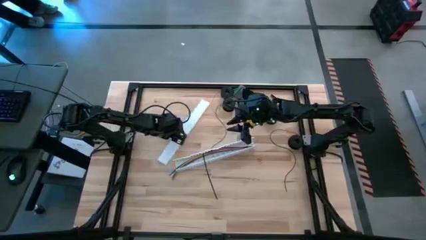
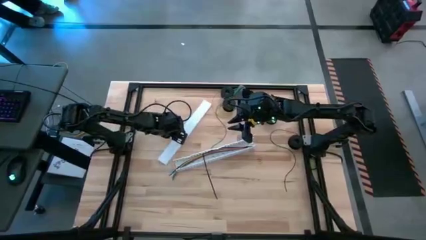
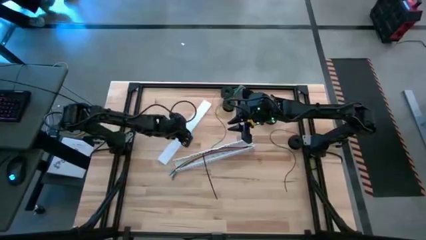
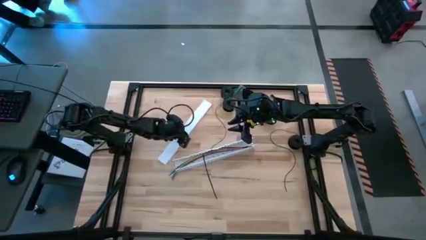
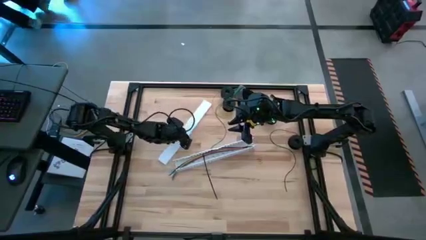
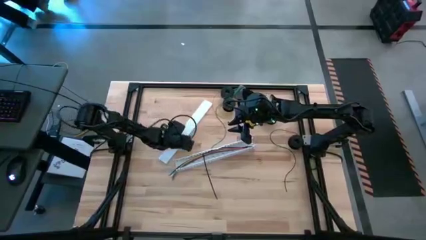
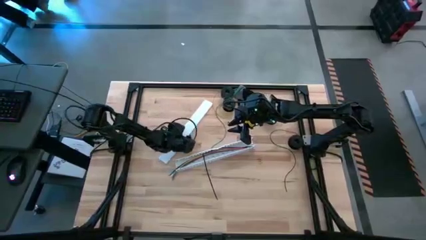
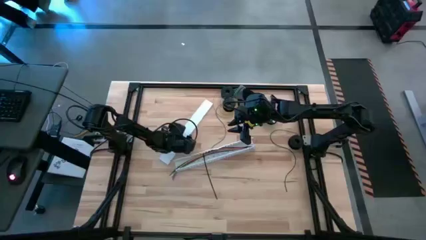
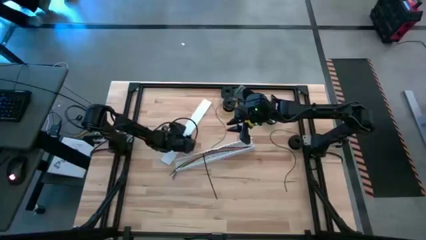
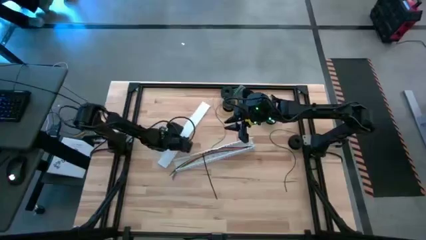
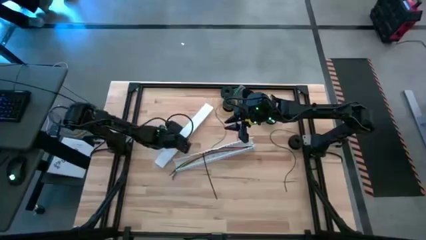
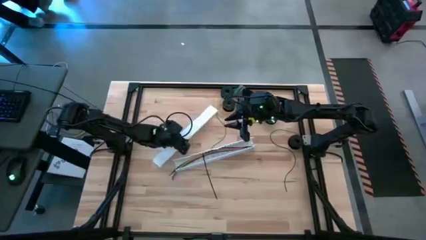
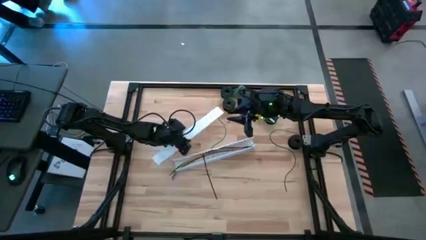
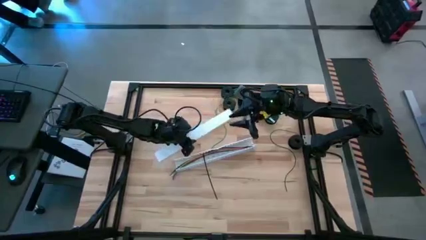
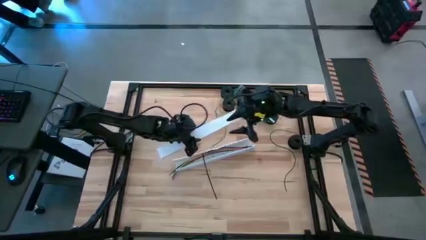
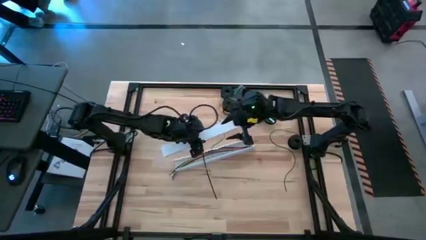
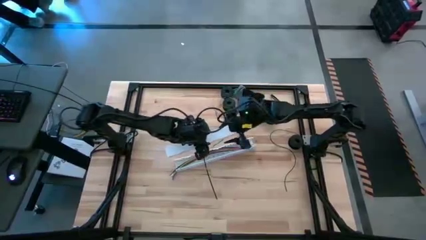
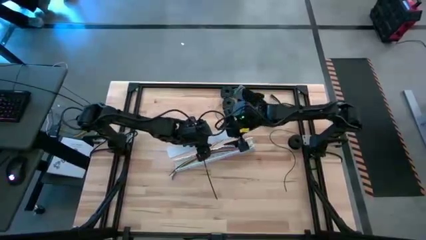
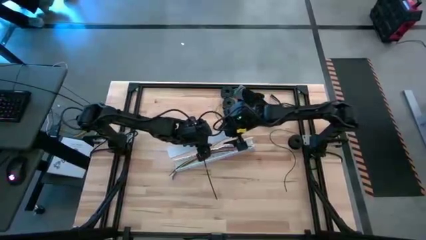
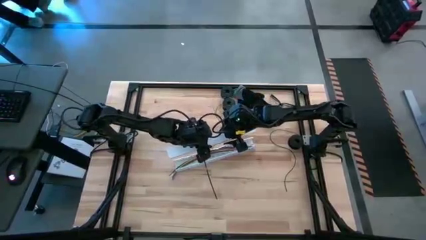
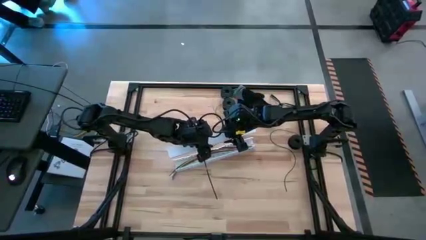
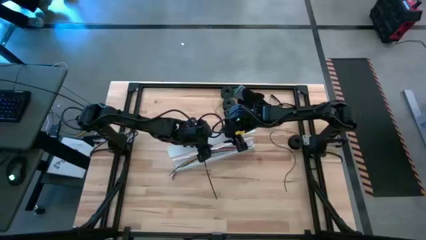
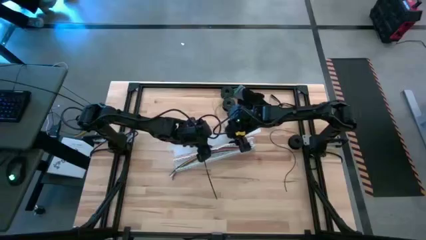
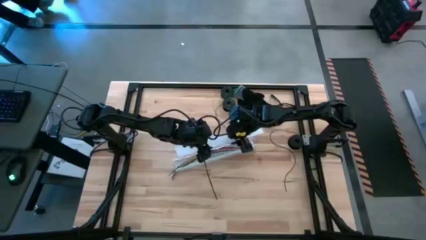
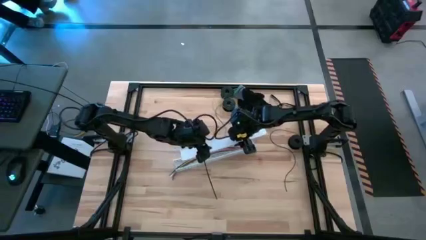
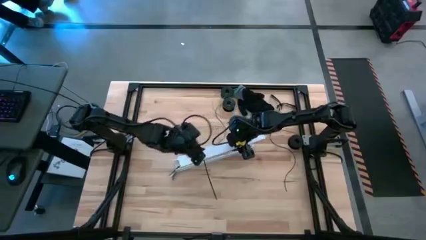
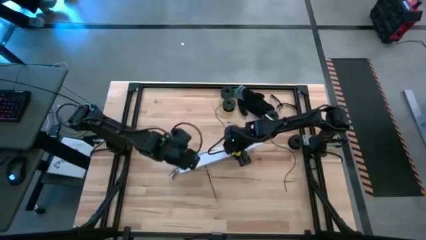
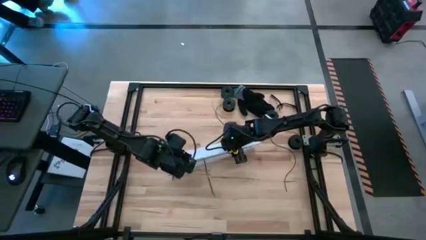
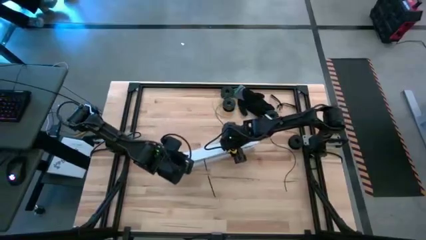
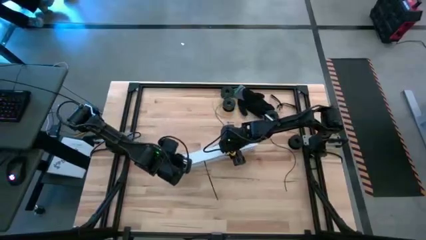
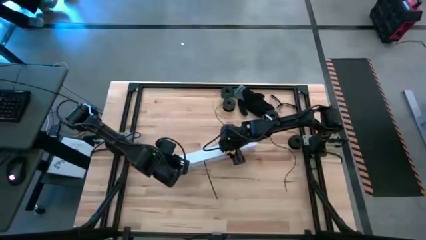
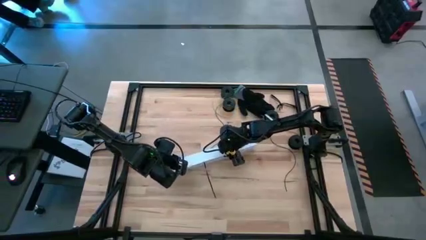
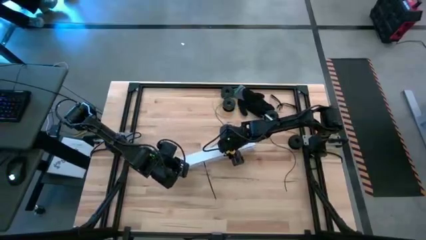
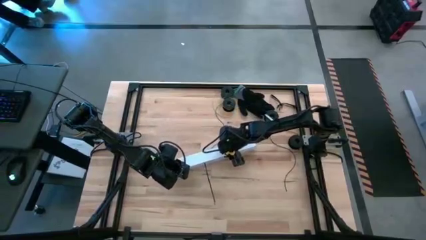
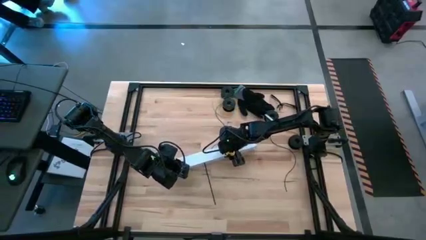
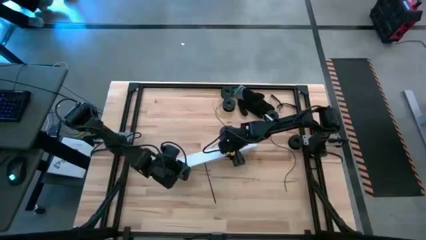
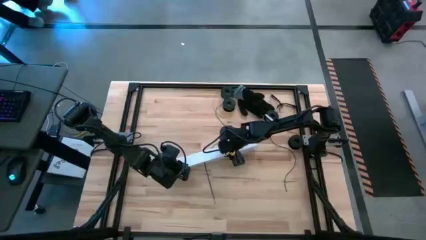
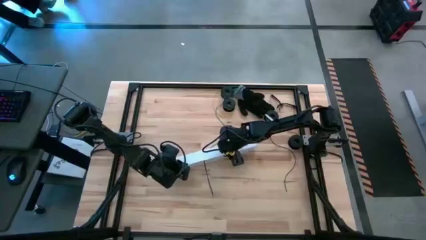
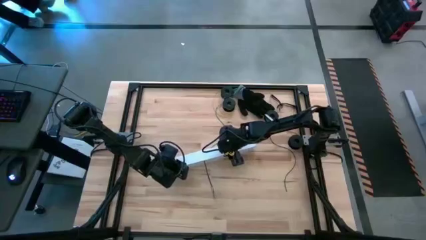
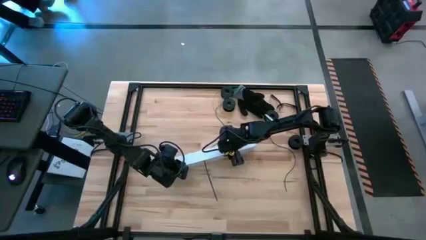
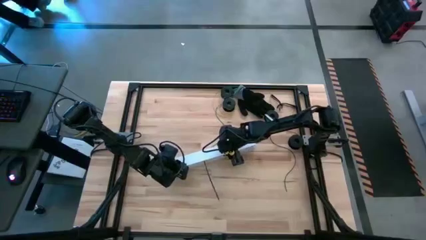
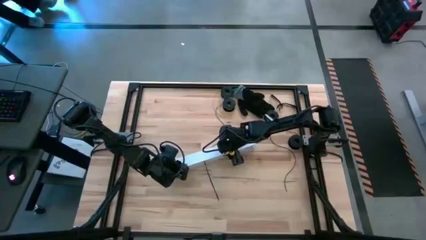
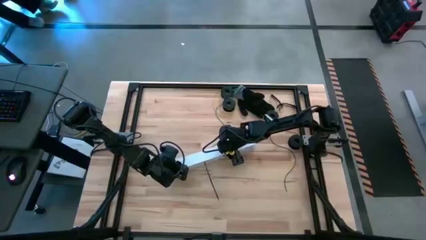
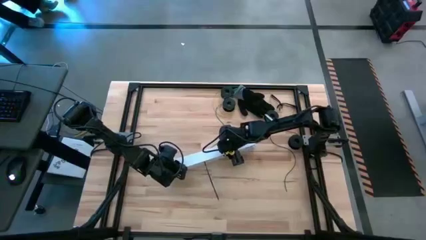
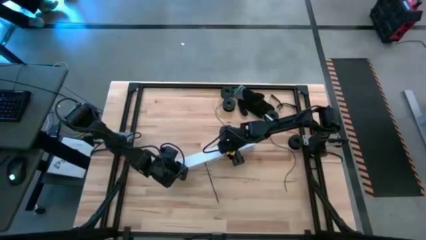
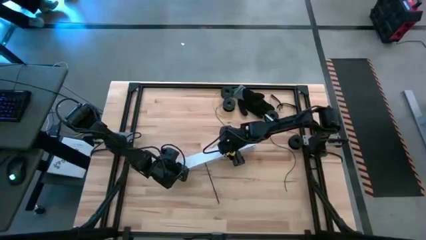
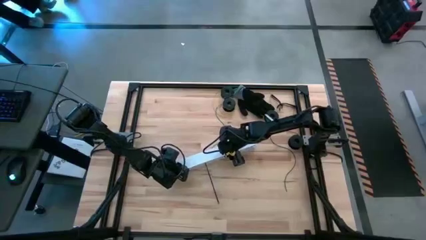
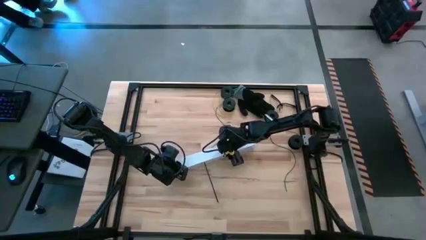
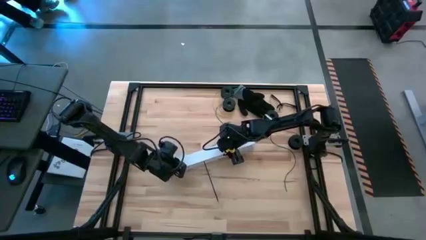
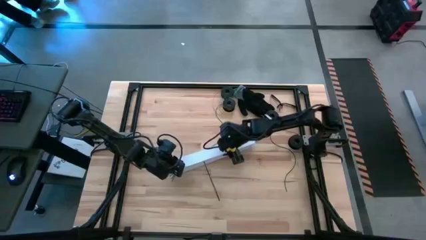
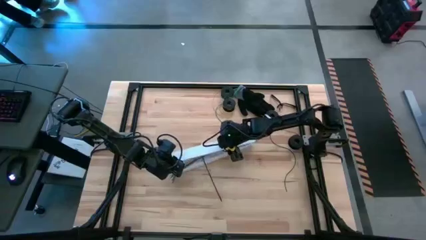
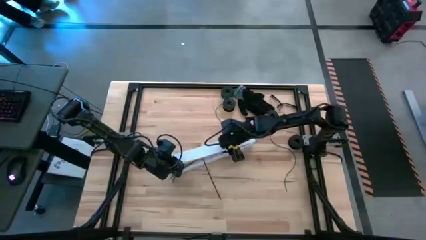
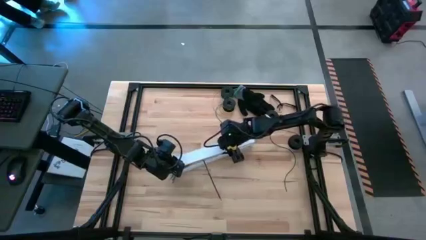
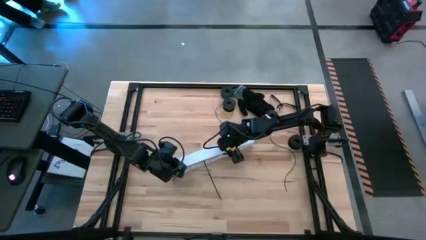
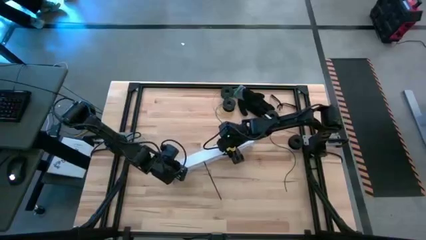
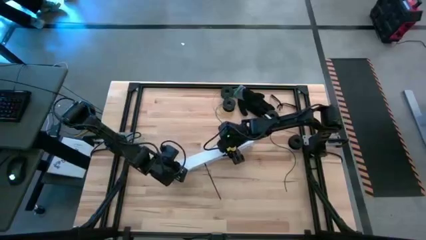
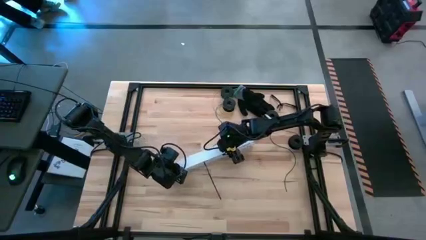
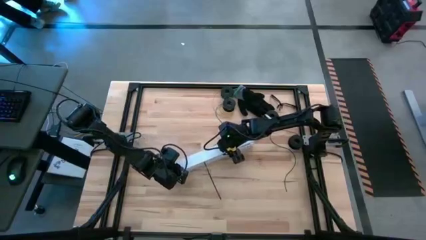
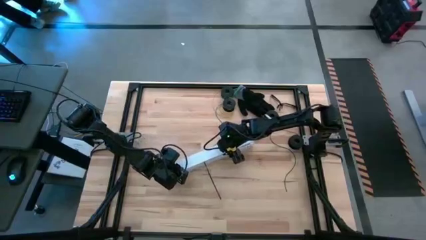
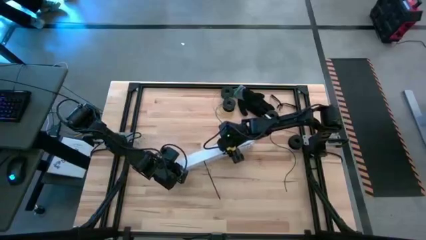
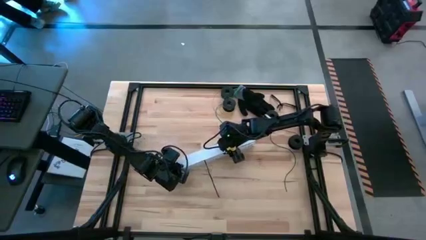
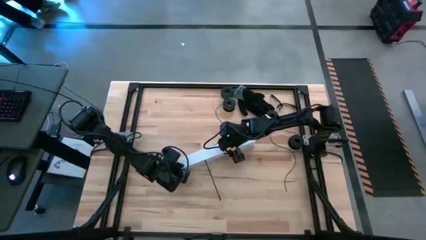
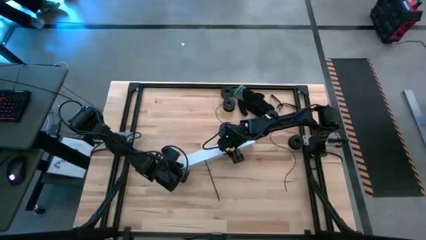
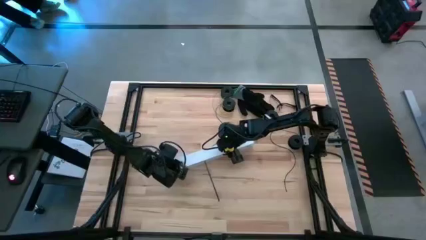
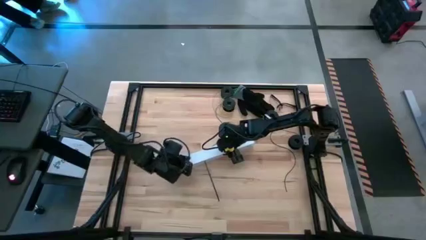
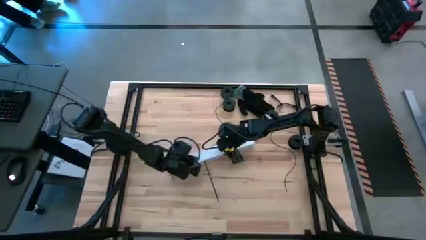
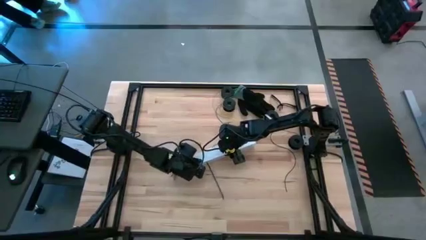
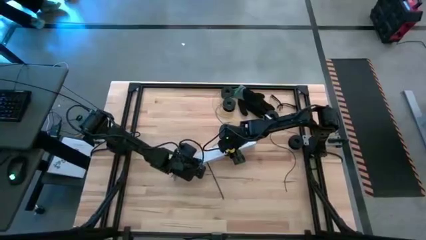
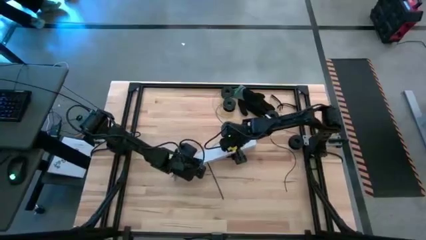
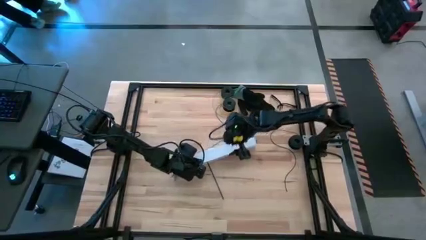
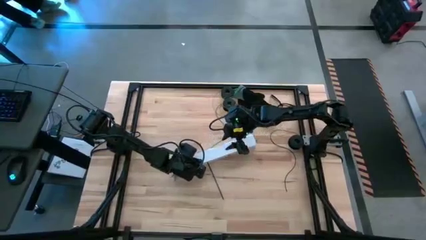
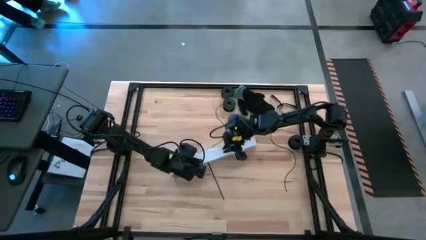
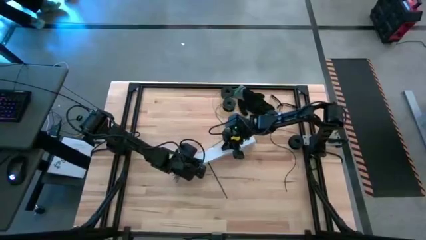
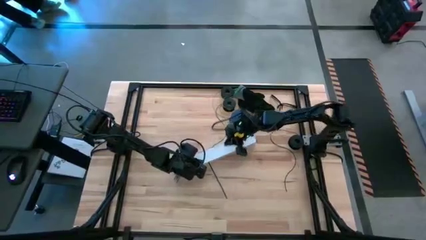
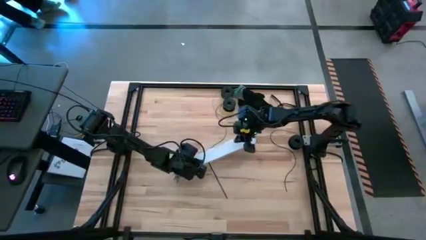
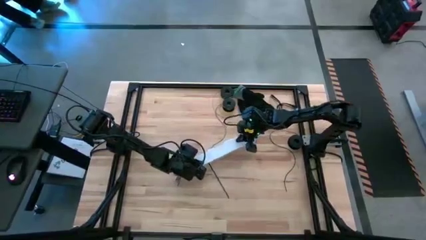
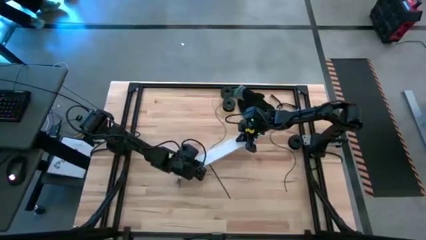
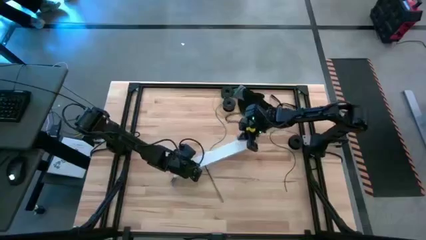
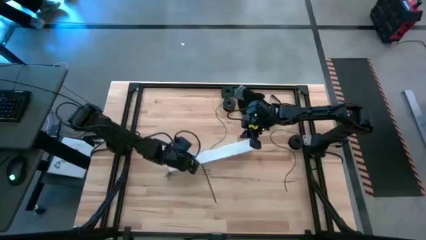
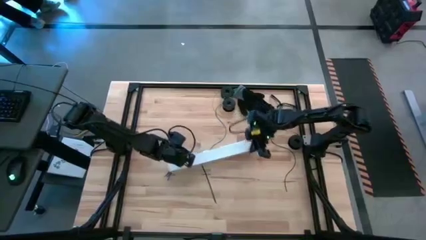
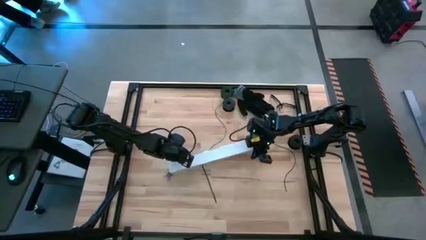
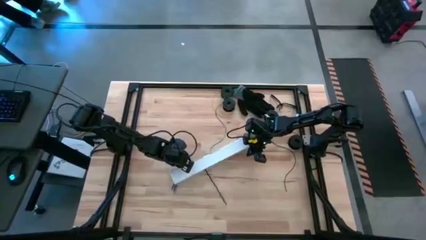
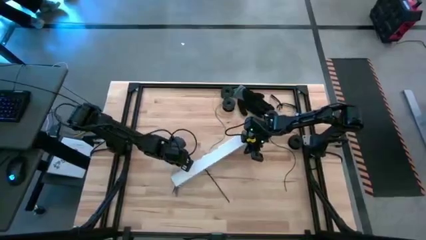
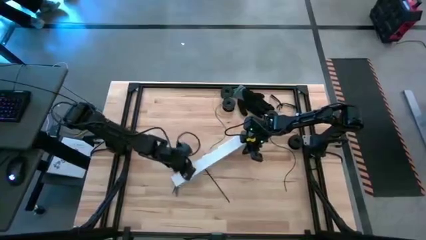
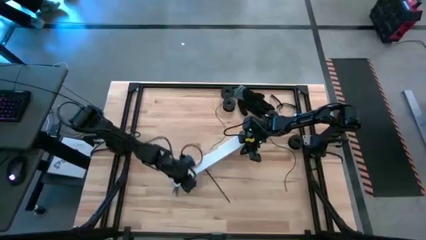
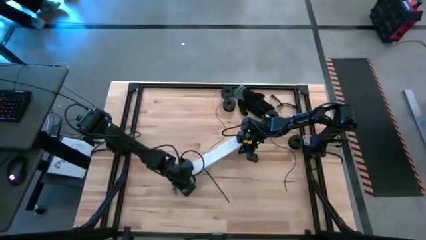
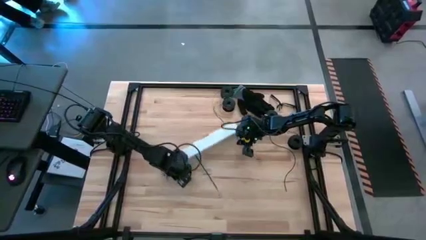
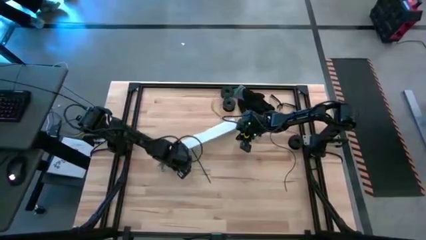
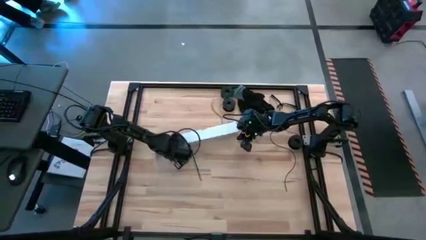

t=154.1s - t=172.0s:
Task: Ziptie cables
Close the white cable duct
